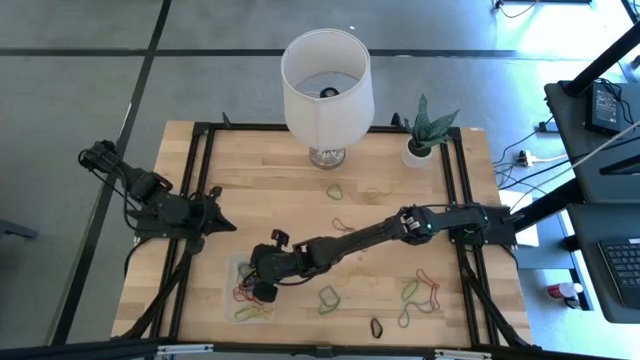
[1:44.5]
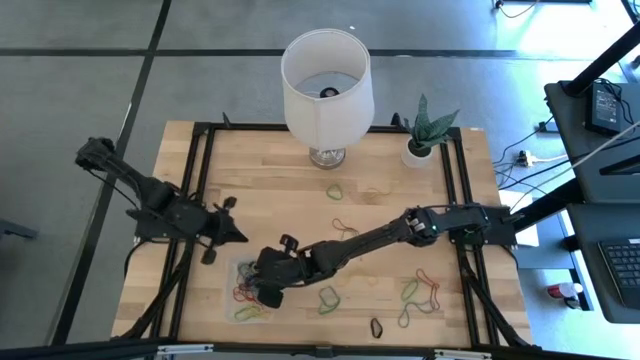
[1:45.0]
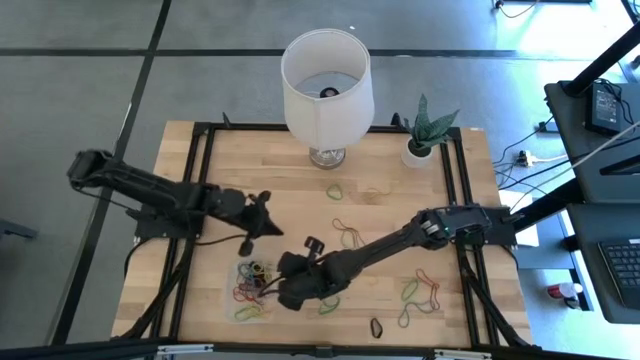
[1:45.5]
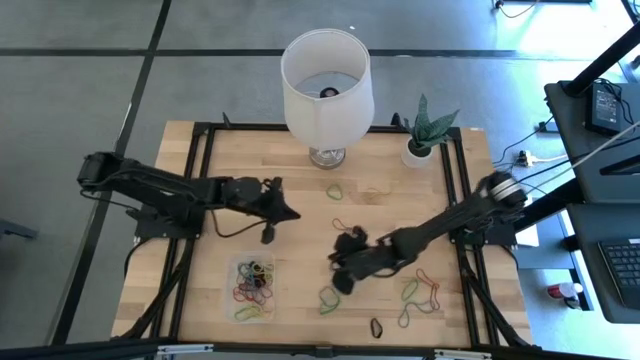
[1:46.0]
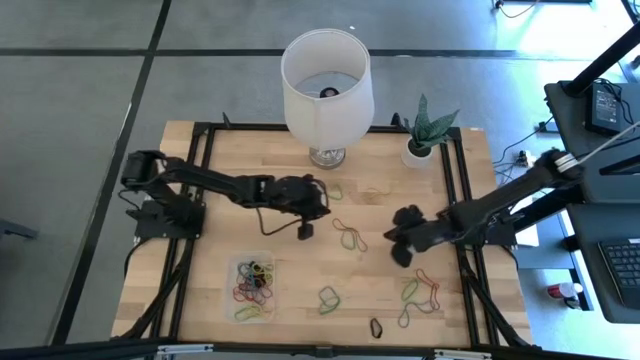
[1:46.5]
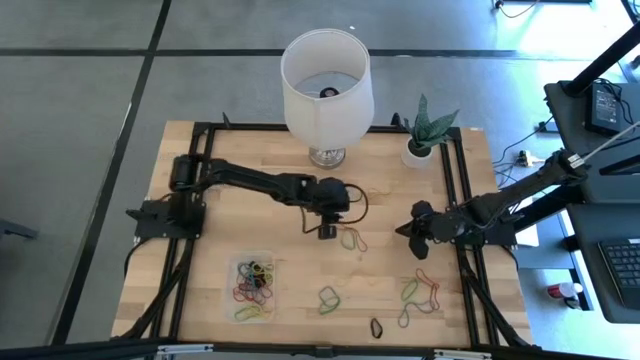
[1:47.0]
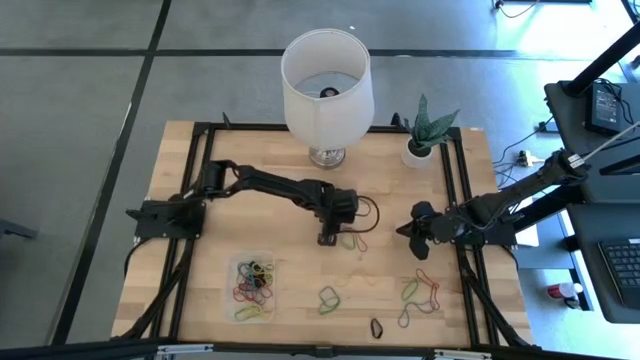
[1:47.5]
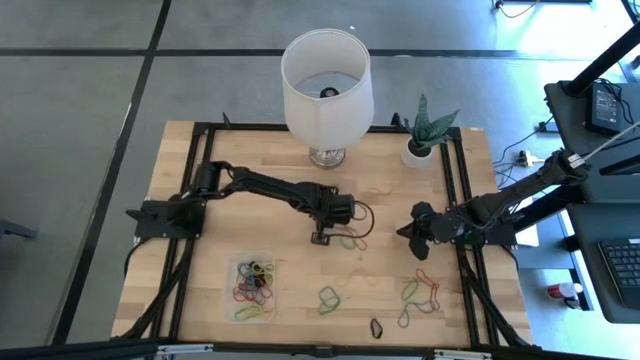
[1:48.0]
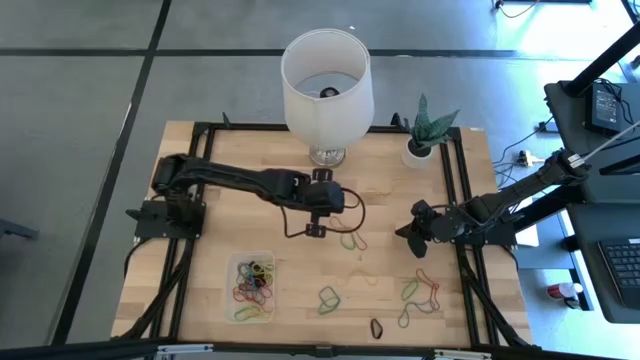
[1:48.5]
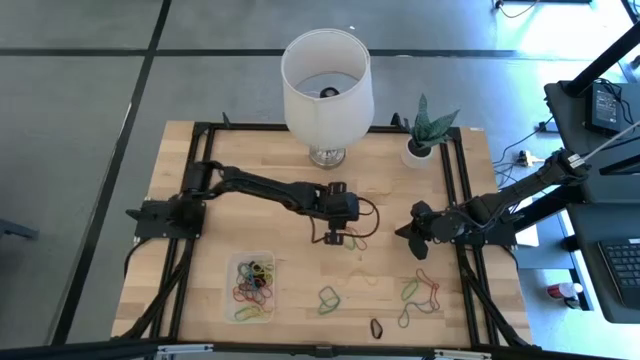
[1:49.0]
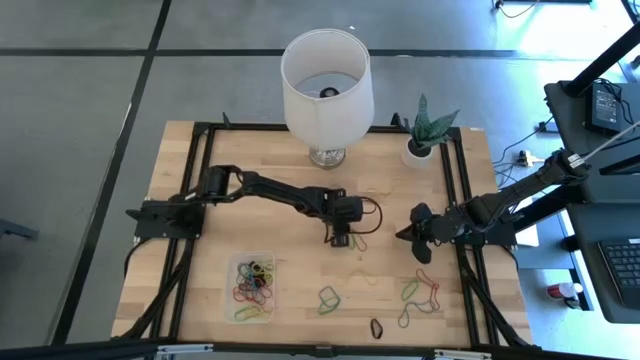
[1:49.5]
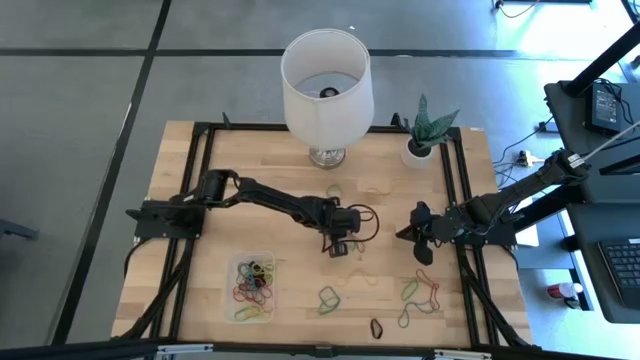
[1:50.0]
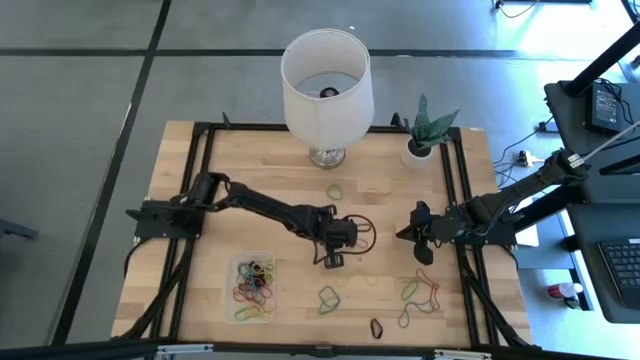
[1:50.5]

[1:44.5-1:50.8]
Task: Pick and place rubber bands into bin
Put the red rubber band into the transparent bin

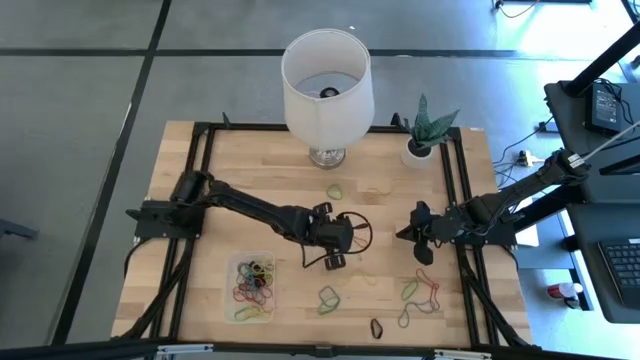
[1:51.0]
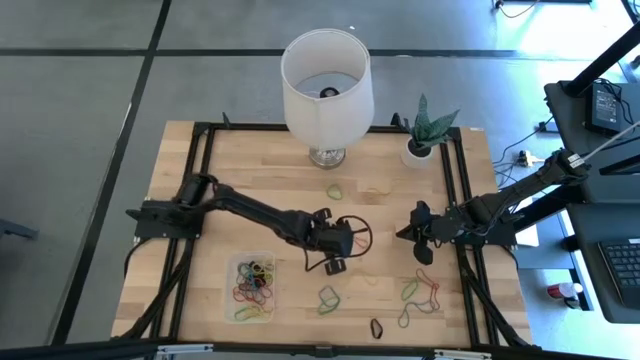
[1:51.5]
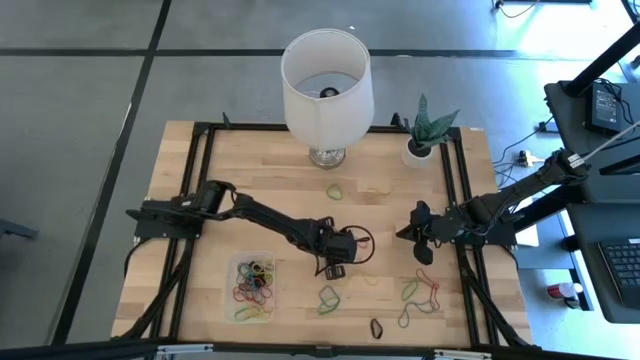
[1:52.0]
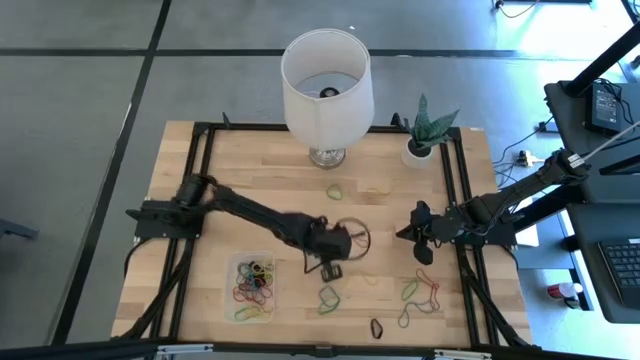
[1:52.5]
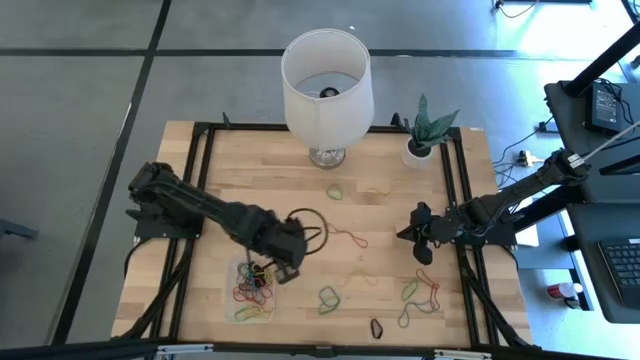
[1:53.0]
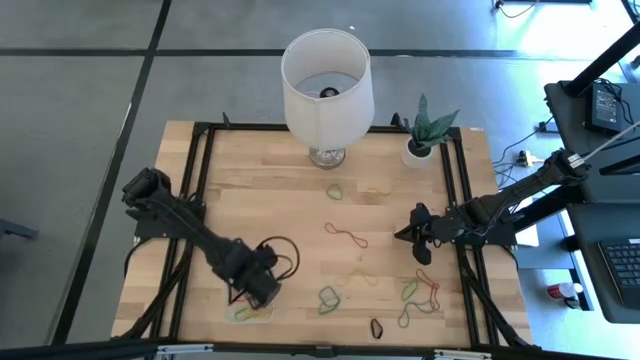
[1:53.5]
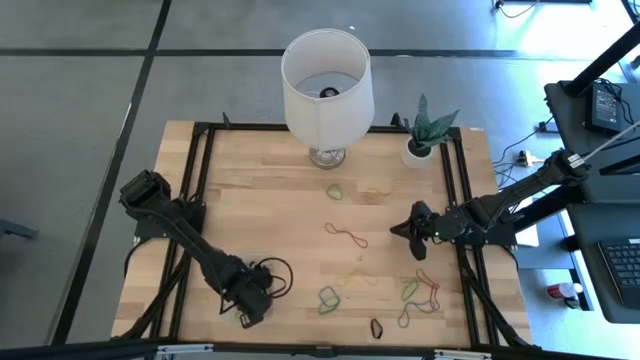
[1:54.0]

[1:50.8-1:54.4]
Put the green rubber band into the transparent bin

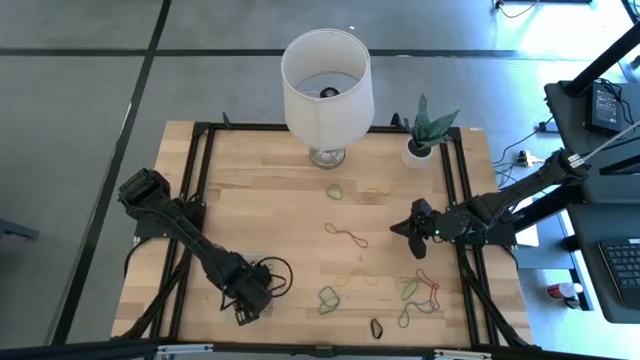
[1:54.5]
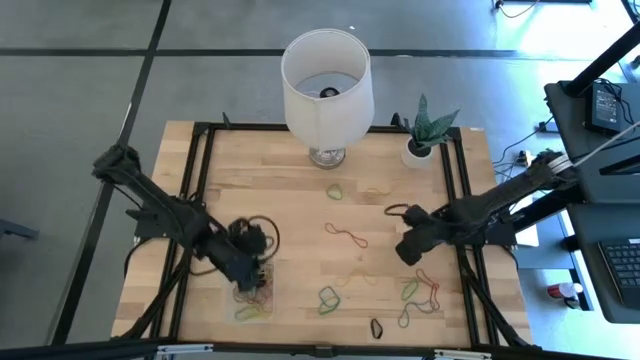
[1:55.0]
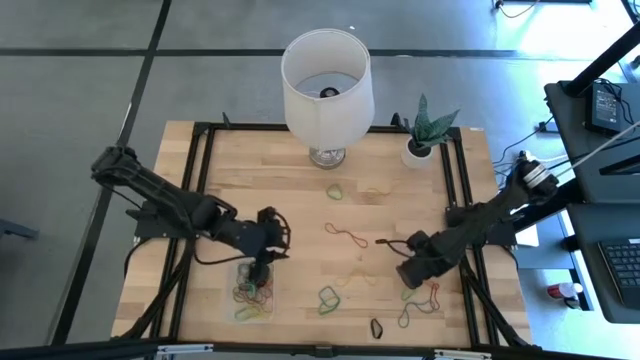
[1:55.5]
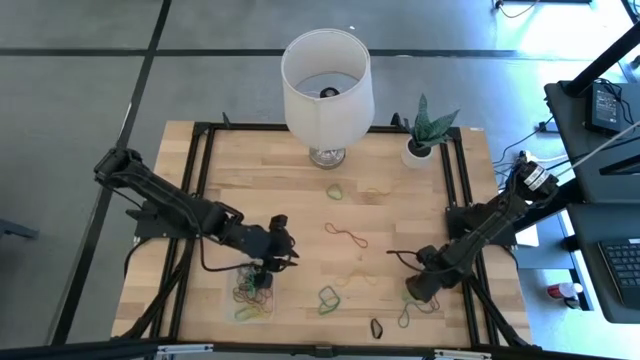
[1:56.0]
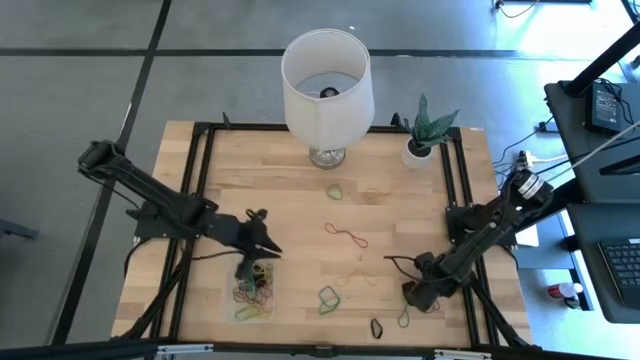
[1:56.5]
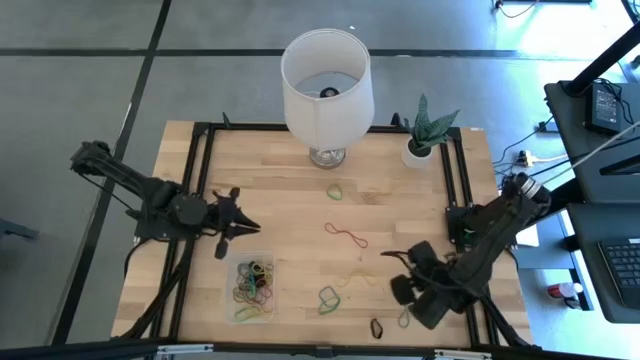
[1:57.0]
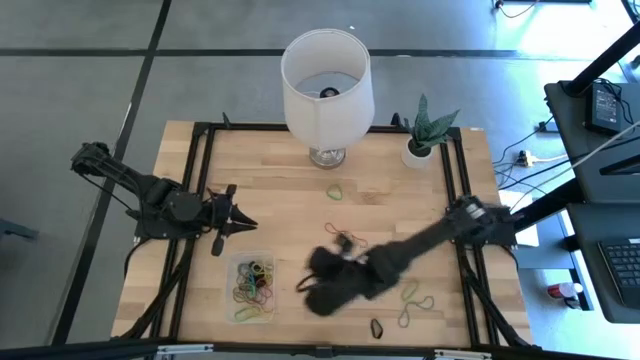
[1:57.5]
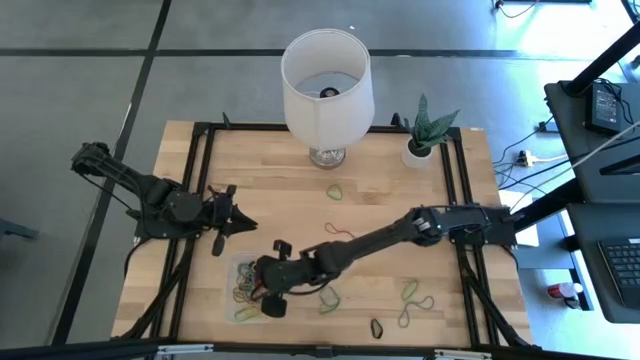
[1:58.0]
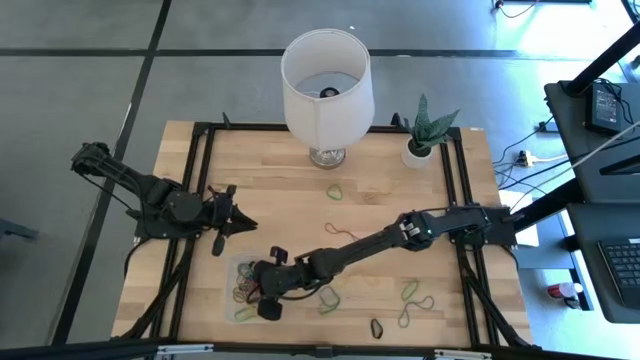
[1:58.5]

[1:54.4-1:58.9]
Put the red rubber band into the transparent bin

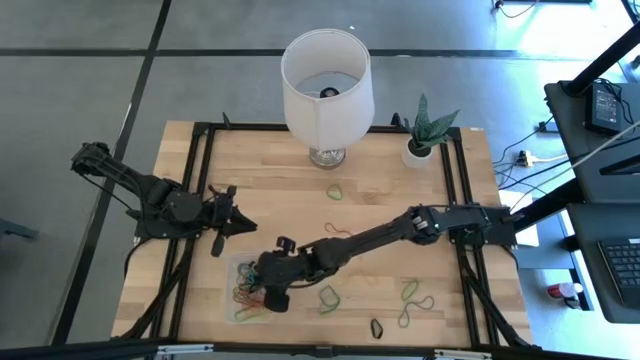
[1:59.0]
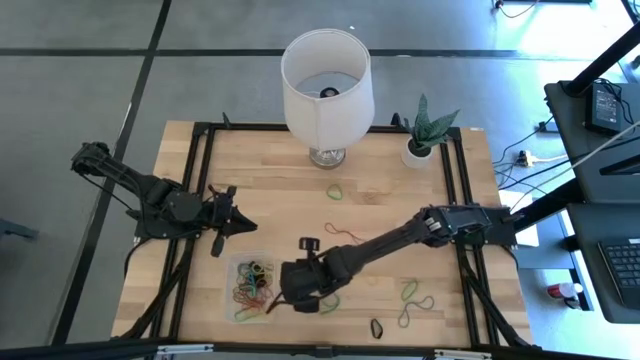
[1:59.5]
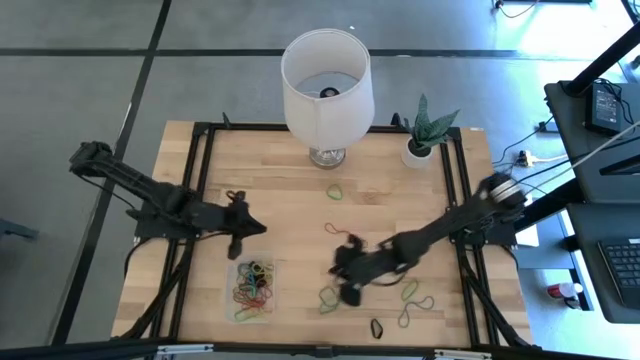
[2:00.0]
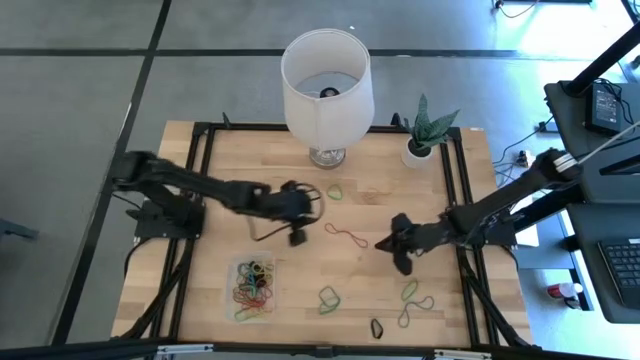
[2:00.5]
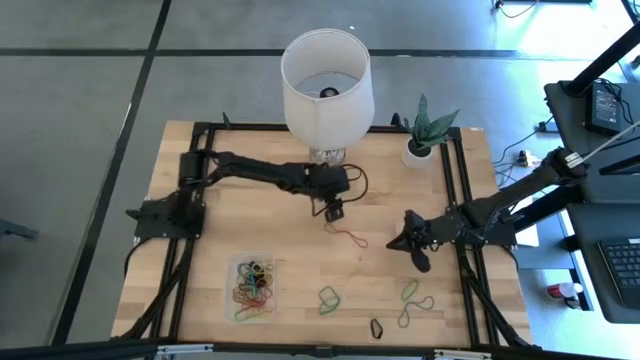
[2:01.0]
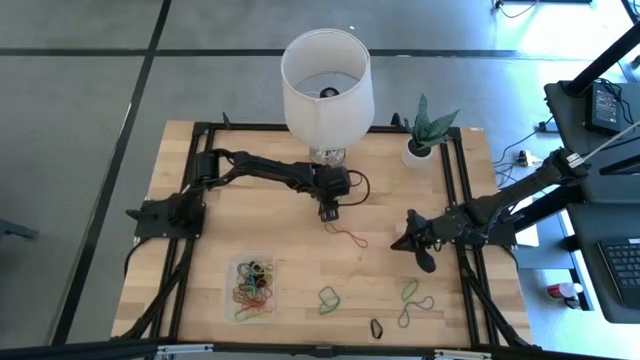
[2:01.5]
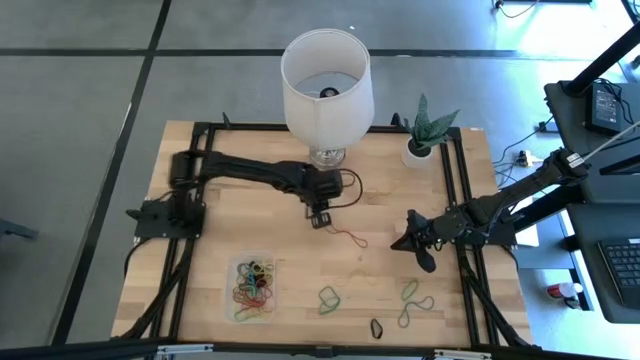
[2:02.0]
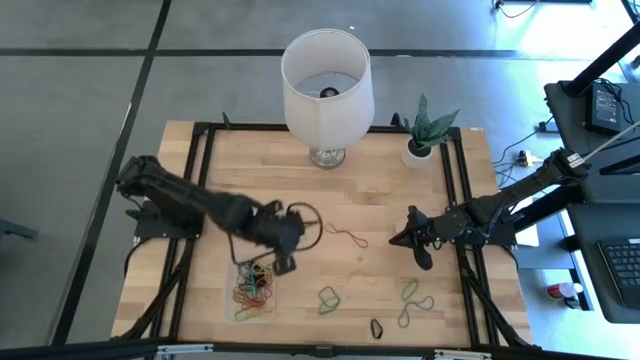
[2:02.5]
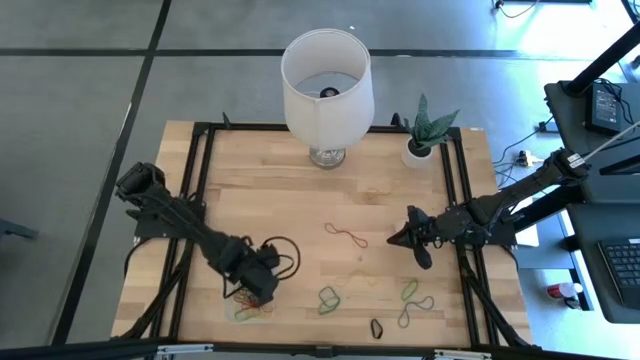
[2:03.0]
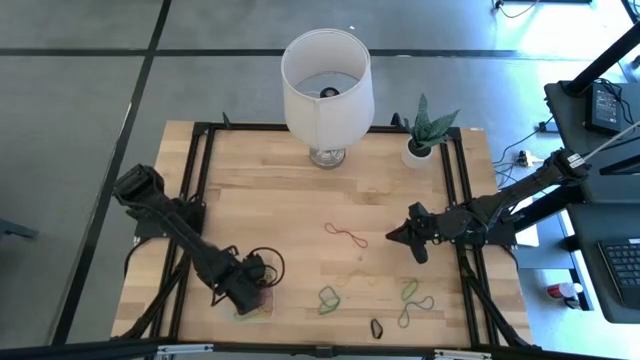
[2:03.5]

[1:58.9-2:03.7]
Put the green rubber band into the transparent bin

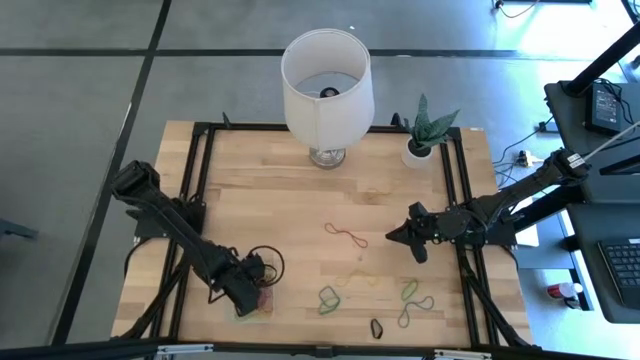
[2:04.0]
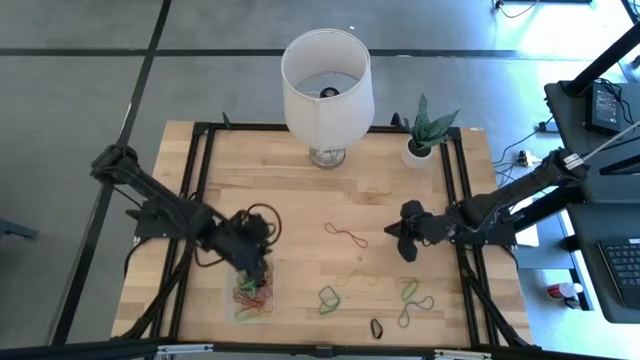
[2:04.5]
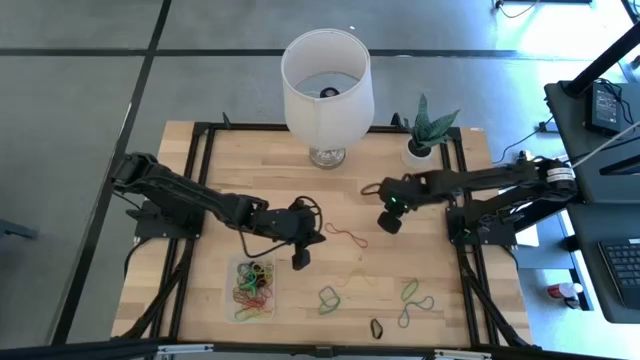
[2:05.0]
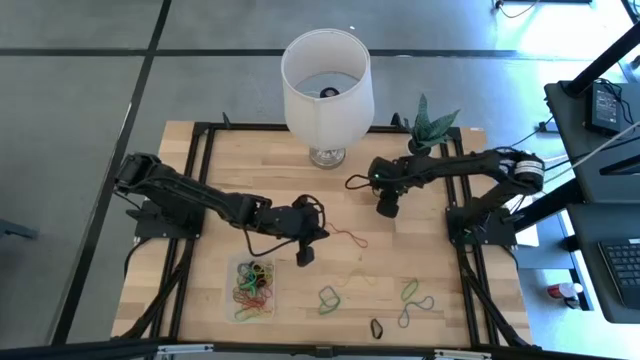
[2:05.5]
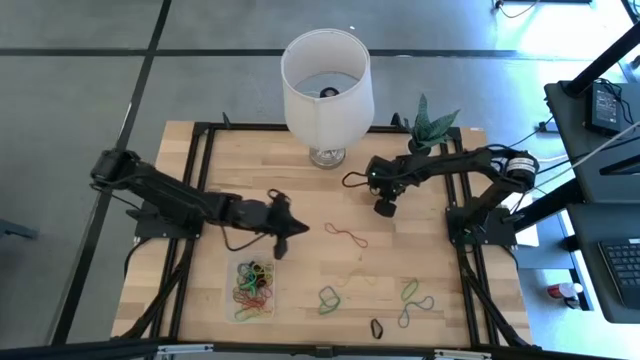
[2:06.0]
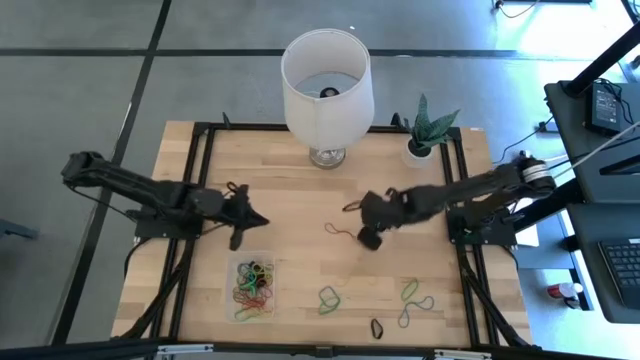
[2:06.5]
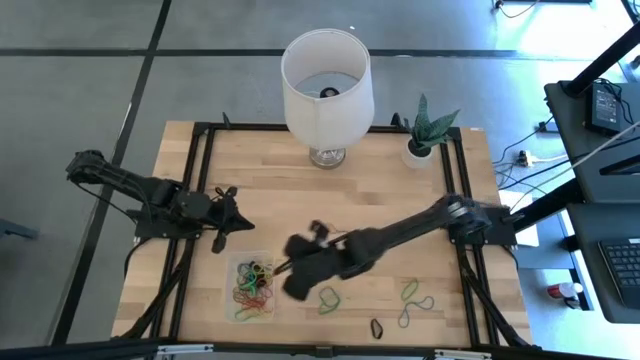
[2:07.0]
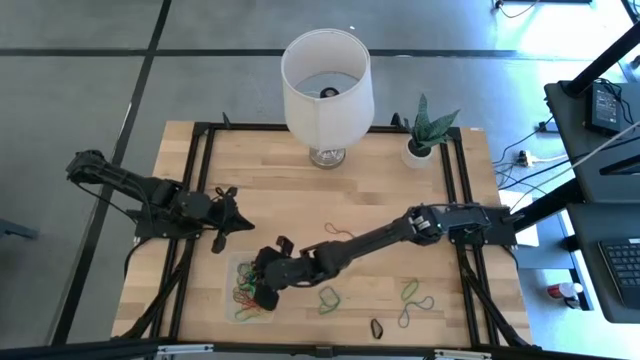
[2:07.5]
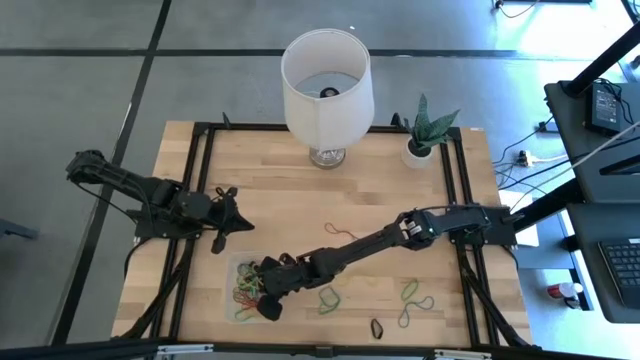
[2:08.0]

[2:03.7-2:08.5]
Put the yellow rubber band into the transparent bin
